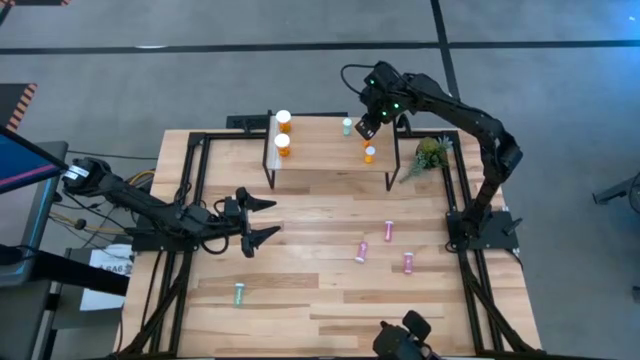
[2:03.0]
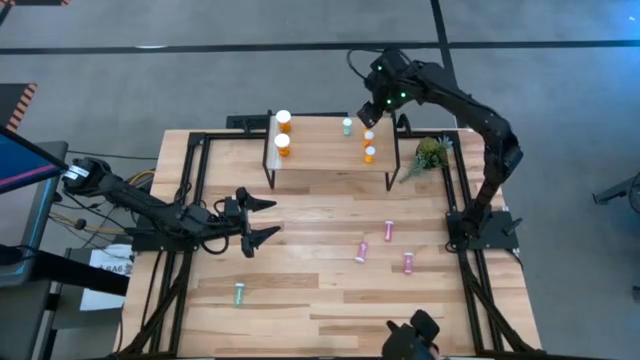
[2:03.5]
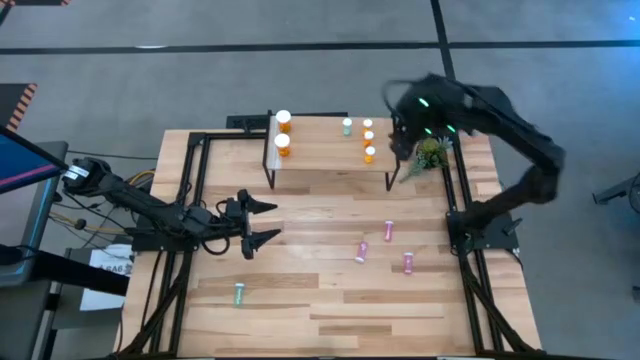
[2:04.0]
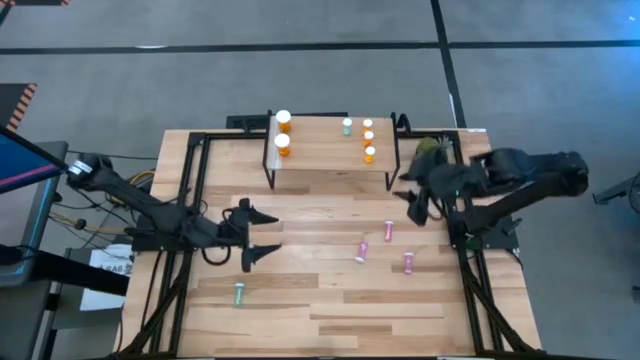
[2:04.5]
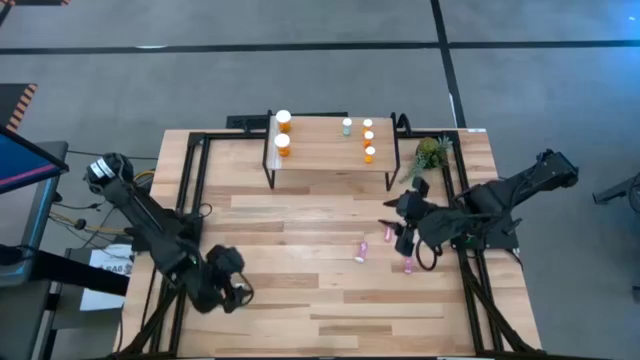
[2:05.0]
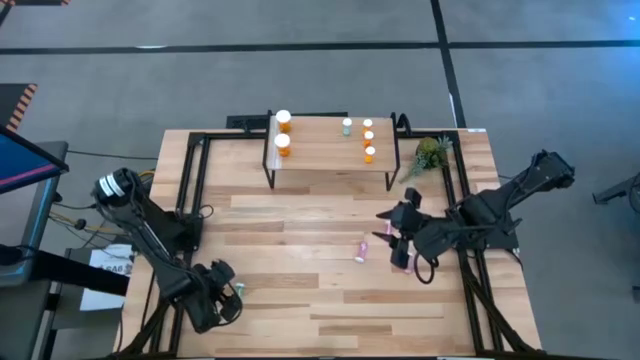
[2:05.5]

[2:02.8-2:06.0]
Task: Pick and place medicine bottles onto shelf by color
Put the blue pill bottle on the shelf aligned with the blue pill bottle

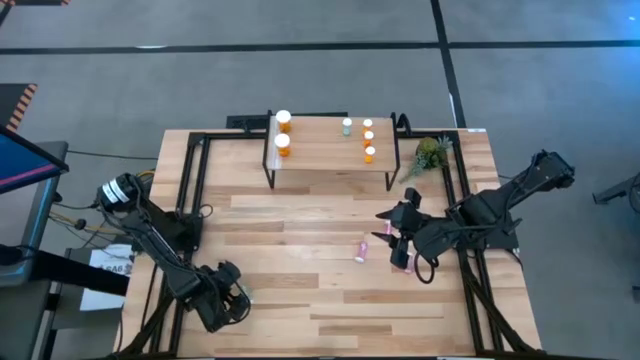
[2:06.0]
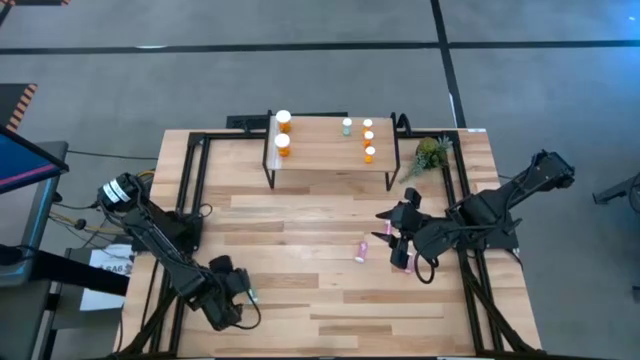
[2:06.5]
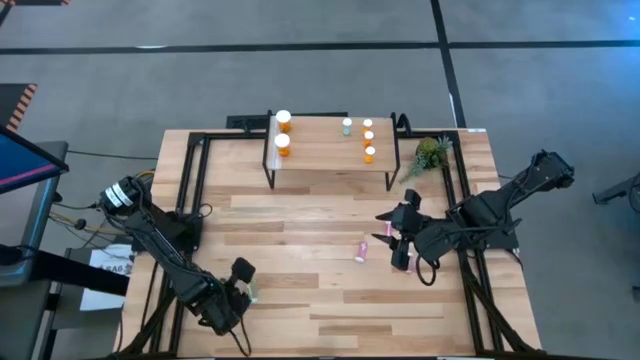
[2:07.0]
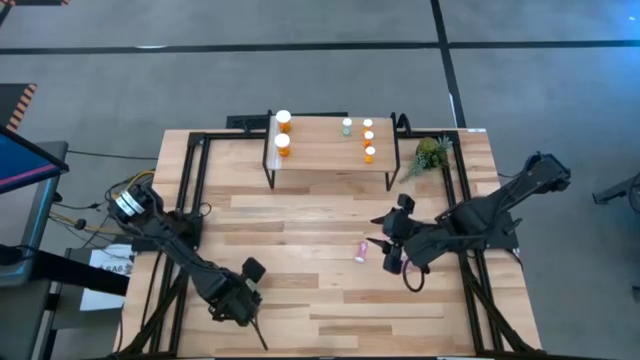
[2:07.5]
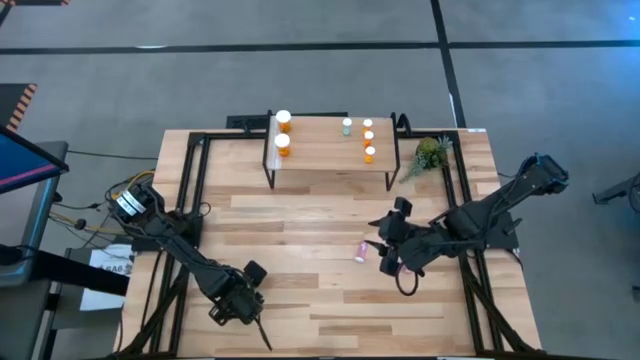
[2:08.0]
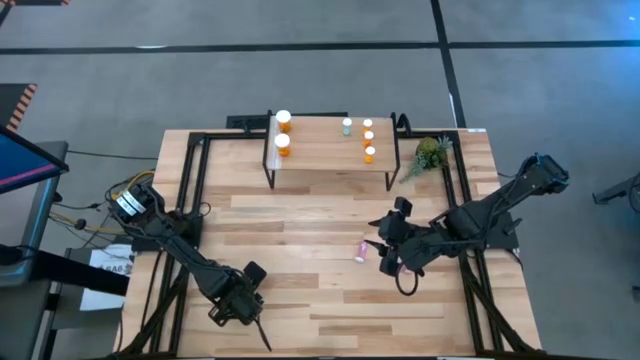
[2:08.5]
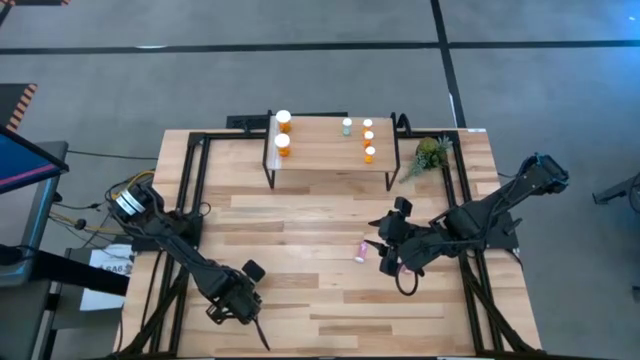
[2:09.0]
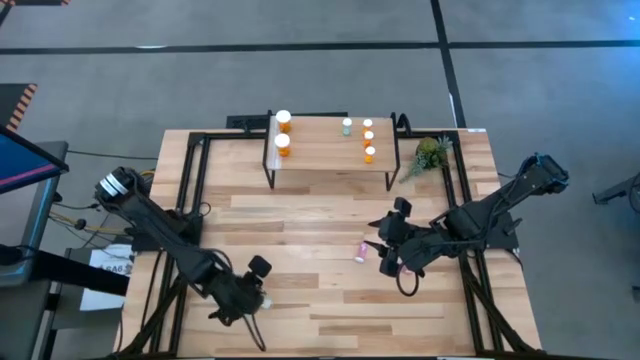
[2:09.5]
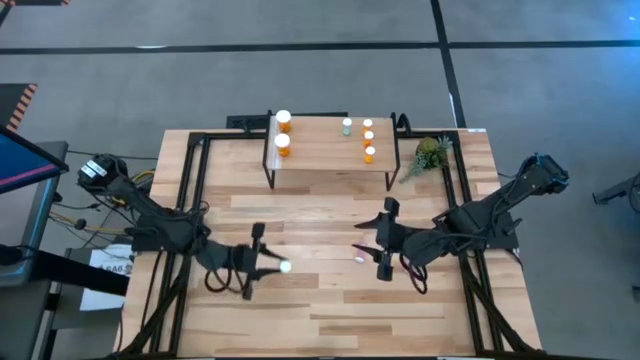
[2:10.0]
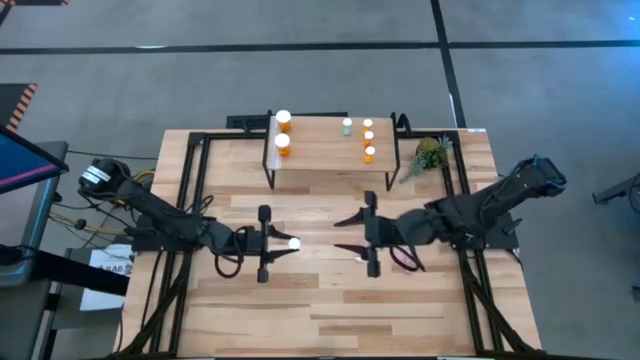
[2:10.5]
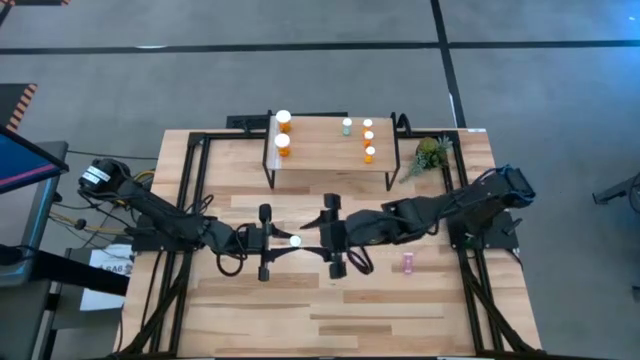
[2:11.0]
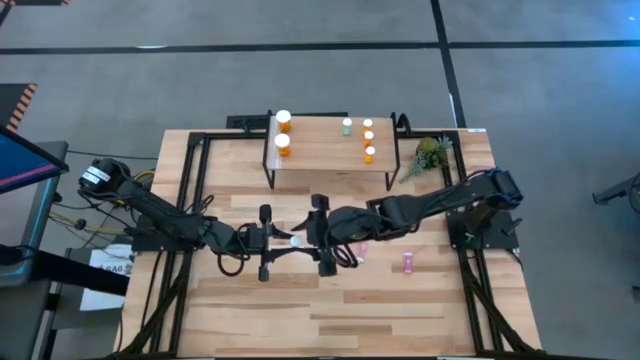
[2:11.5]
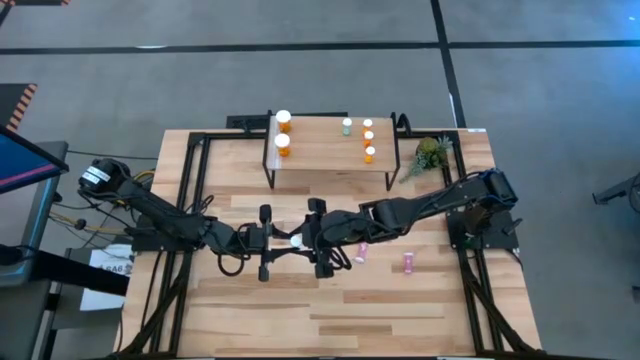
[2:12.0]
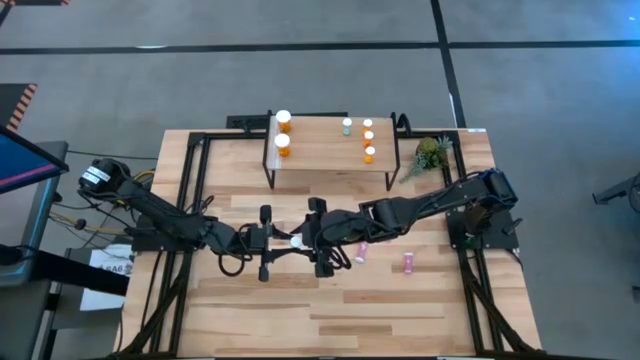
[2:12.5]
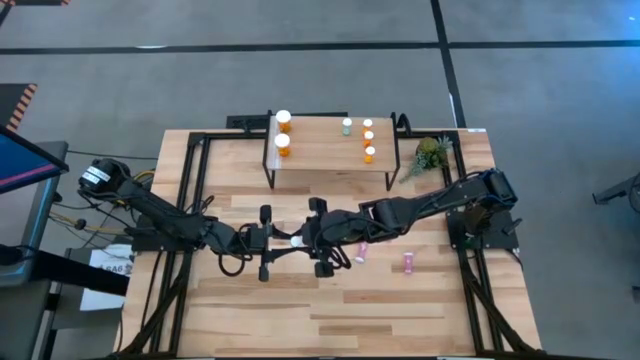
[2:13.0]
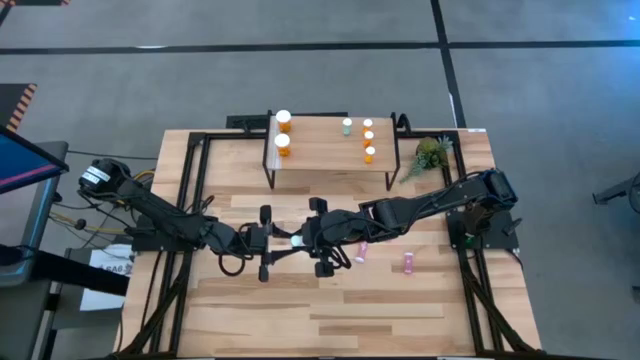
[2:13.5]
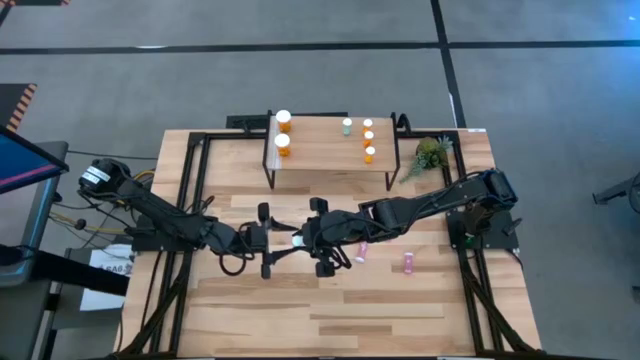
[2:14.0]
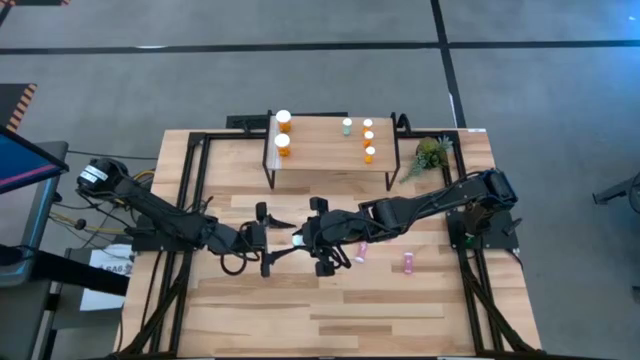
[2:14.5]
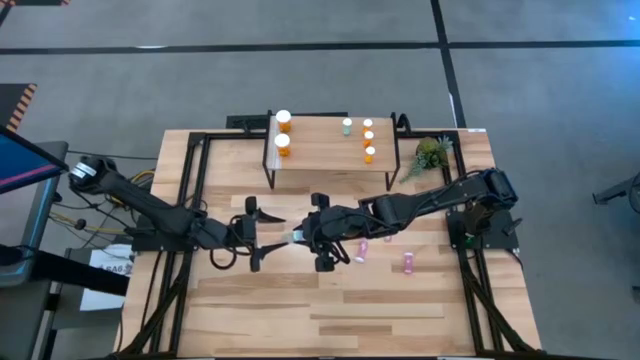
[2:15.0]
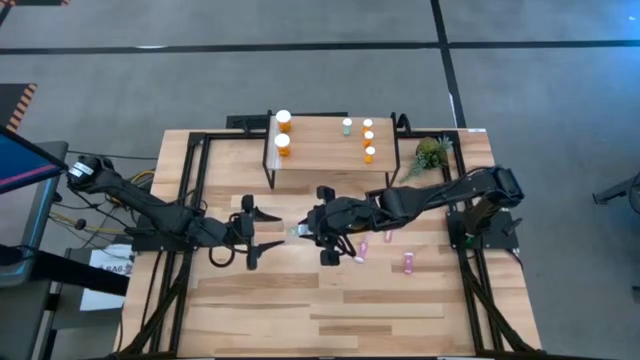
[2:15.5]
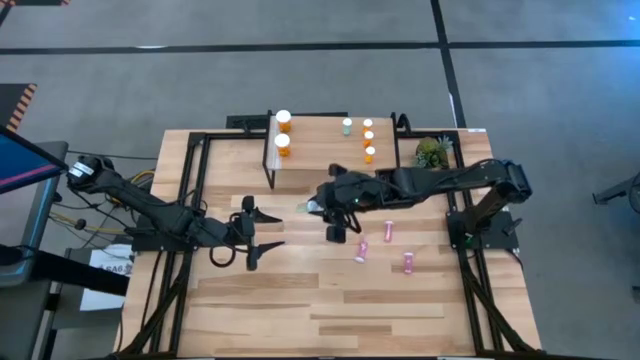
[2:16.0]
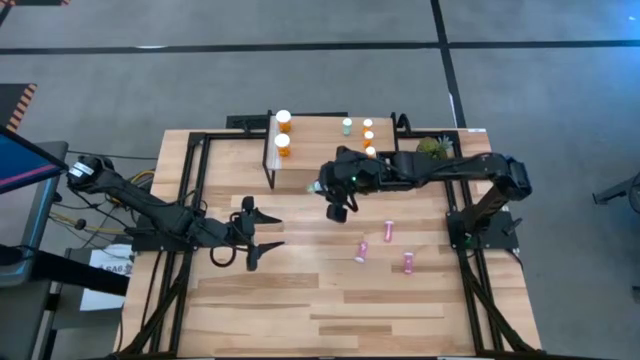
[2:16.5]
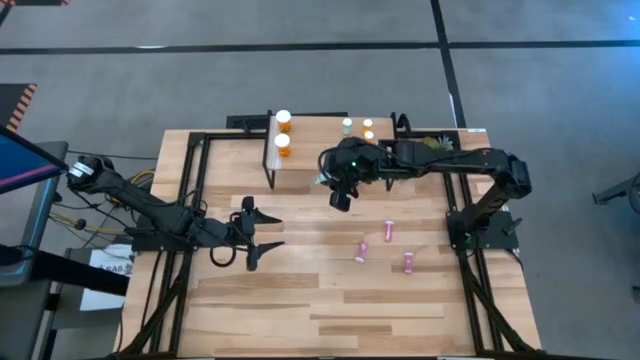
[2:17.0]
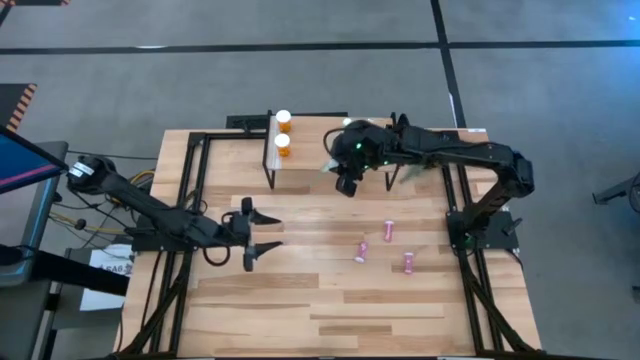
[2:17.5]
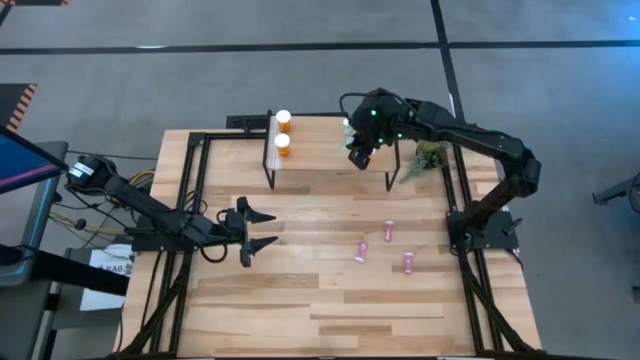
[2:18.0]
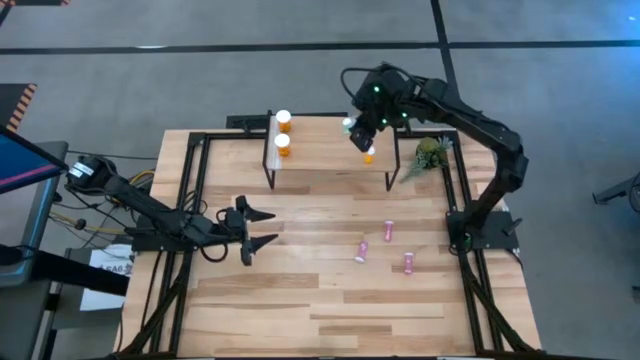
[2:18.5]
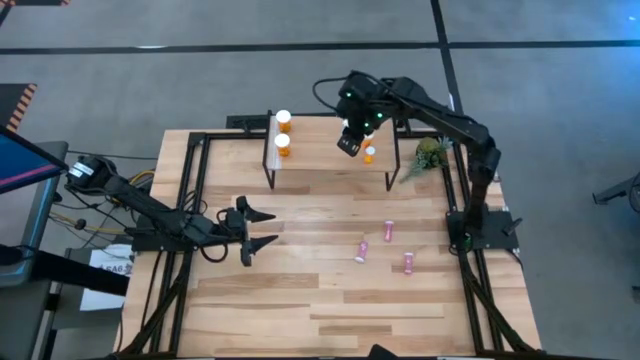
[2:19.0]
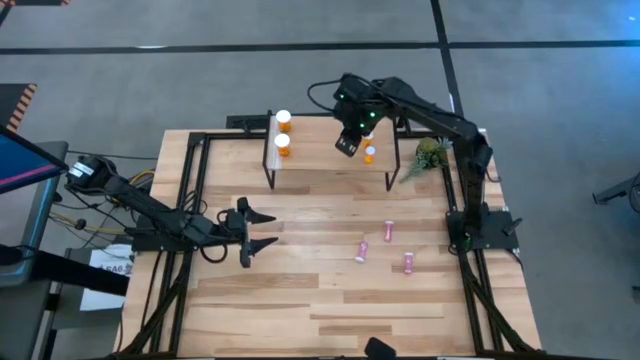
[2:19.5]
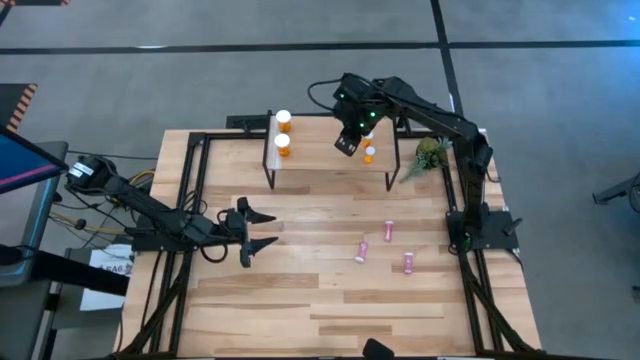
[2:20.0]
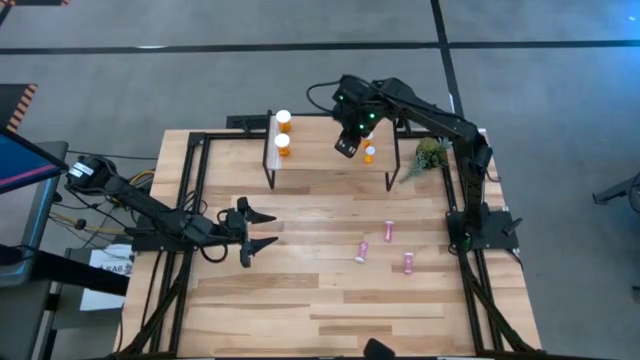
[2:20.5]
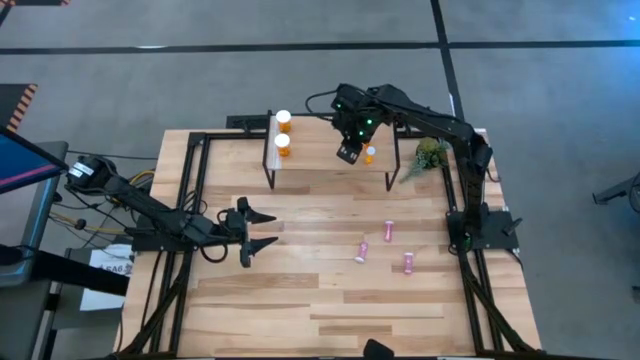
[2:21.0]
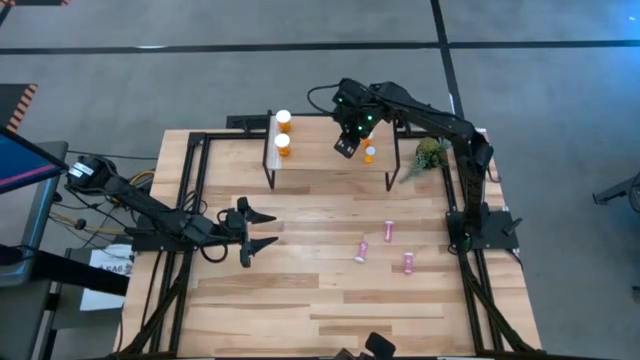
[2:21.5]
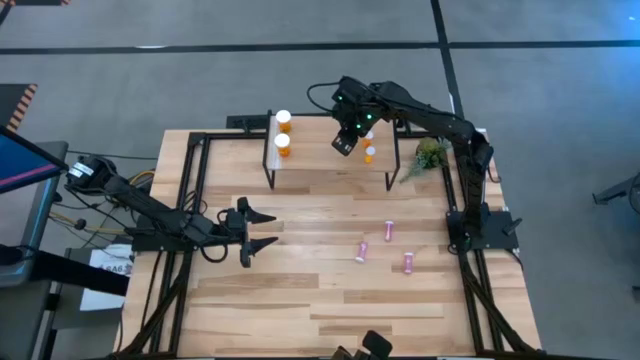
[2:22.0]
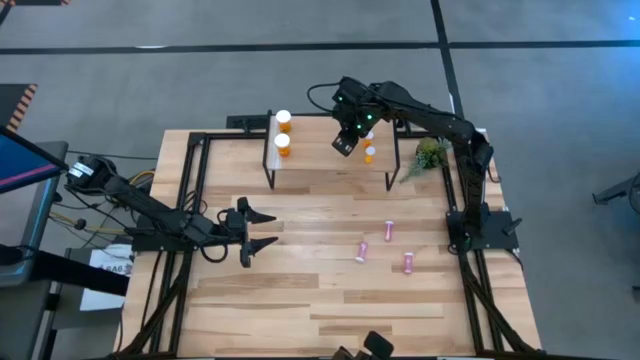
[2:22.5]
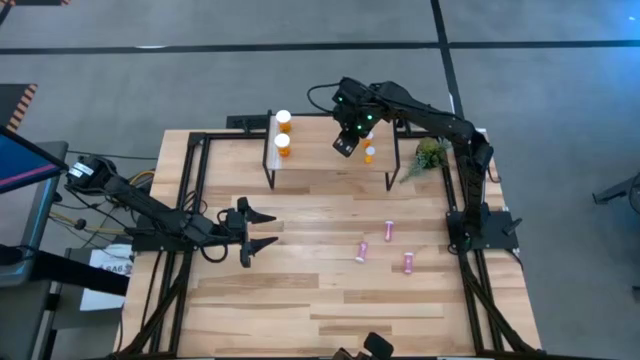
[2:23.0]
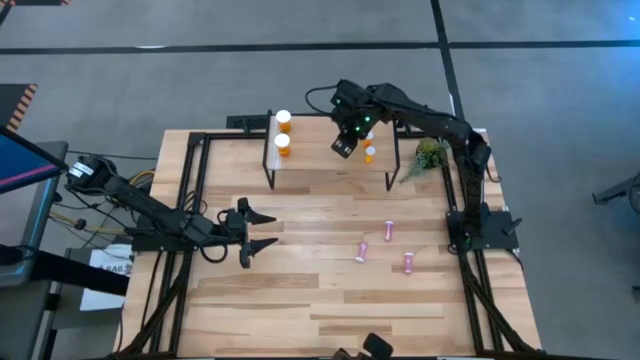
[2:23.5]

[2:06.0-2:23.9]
Put the blue pill bottle on the shelf aligned with the blue pill bottle

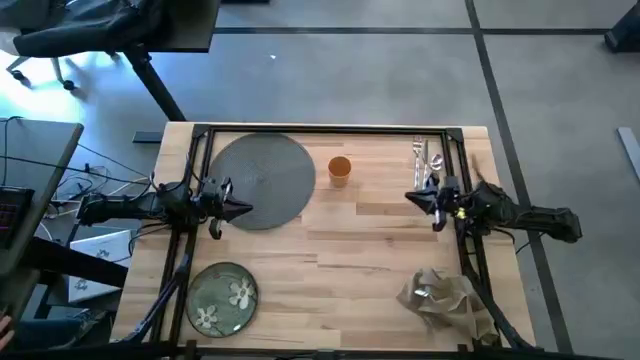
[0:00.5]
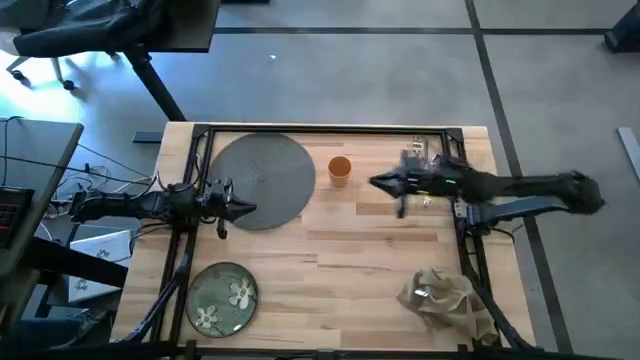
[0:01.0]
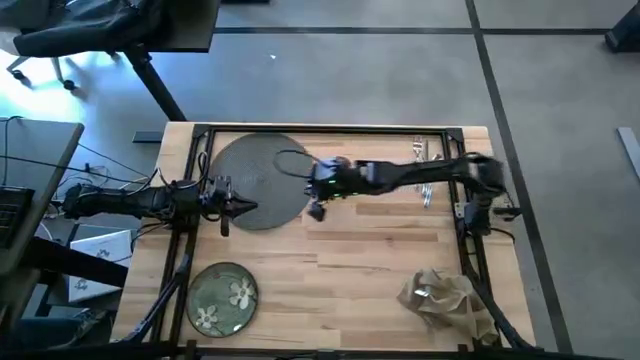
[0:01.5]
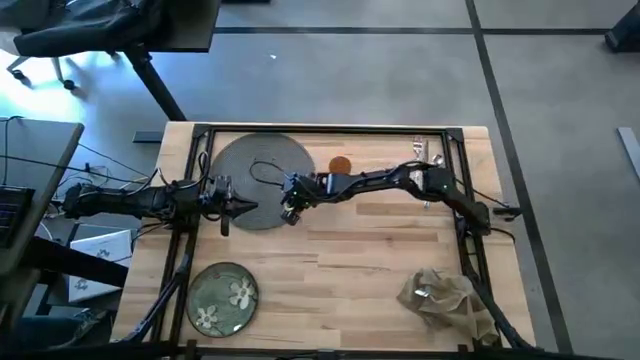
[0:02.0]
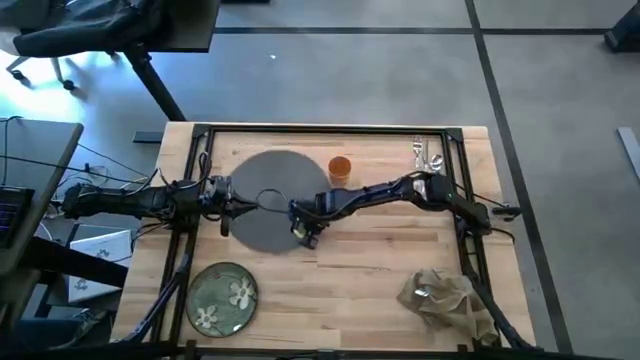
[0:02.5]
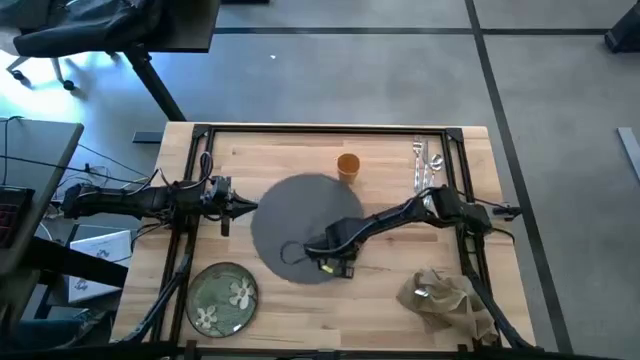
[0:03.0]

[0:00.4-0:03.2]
Task: Set table place
Move the gray table mat to the center of the table
